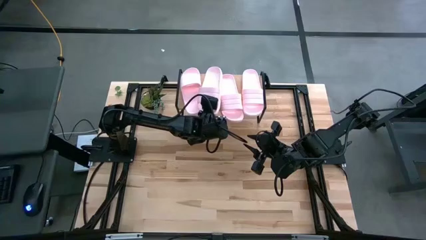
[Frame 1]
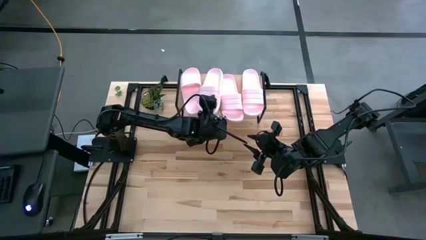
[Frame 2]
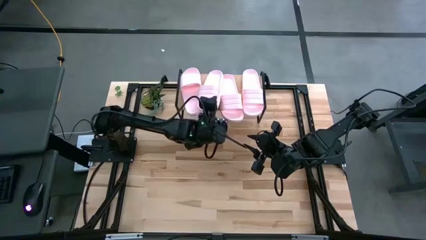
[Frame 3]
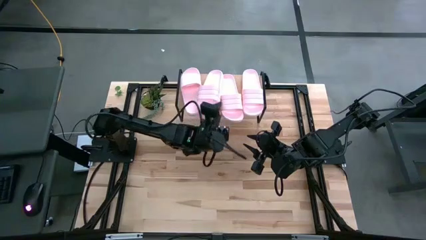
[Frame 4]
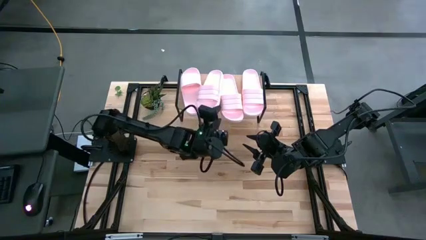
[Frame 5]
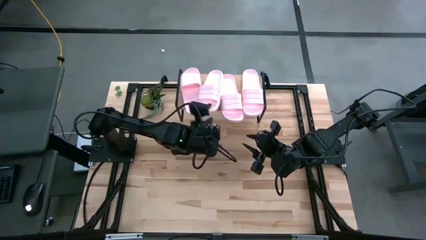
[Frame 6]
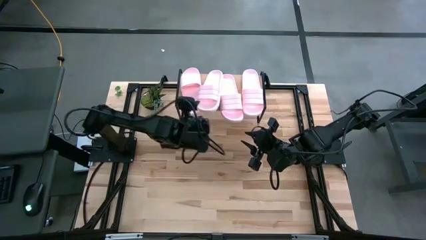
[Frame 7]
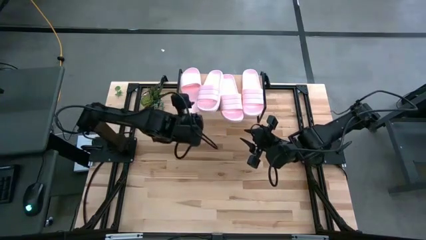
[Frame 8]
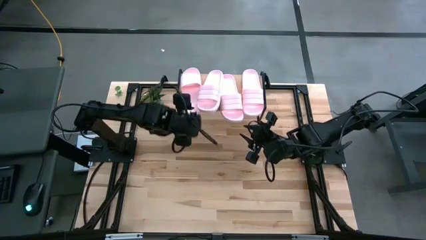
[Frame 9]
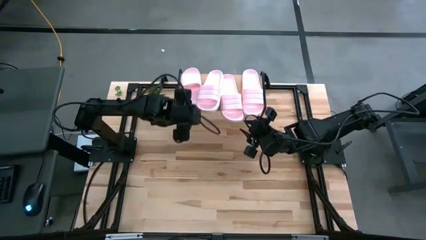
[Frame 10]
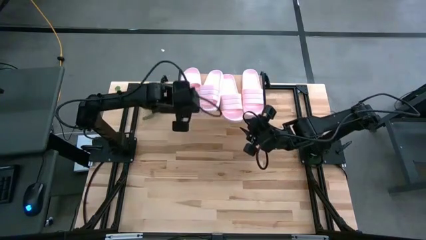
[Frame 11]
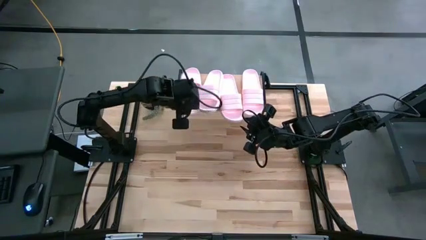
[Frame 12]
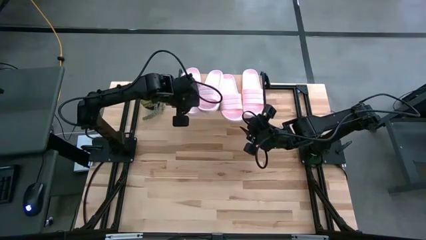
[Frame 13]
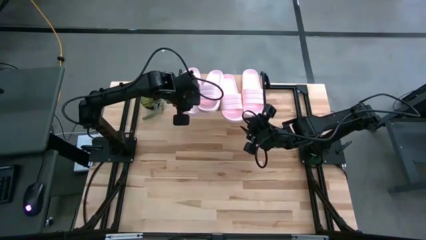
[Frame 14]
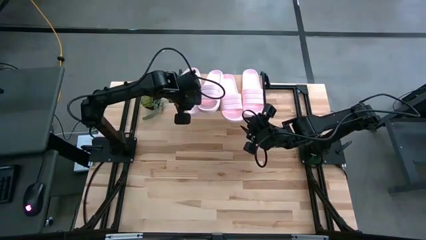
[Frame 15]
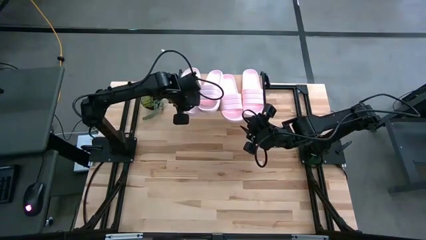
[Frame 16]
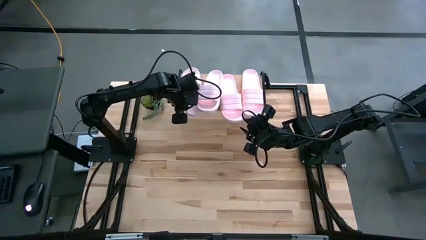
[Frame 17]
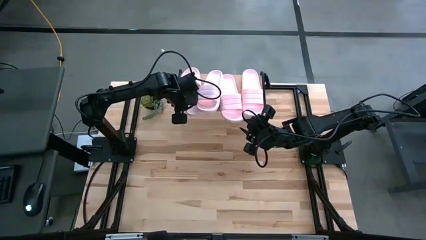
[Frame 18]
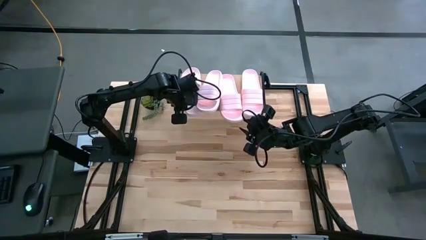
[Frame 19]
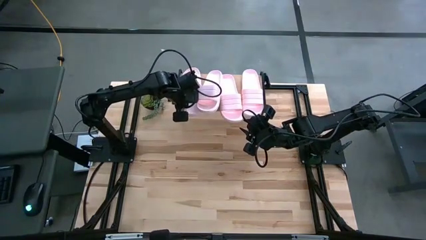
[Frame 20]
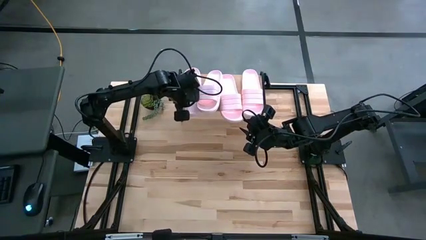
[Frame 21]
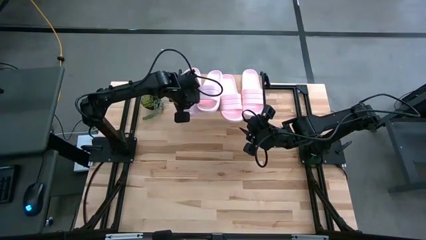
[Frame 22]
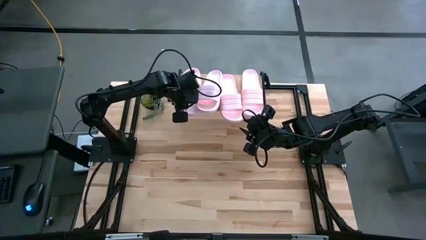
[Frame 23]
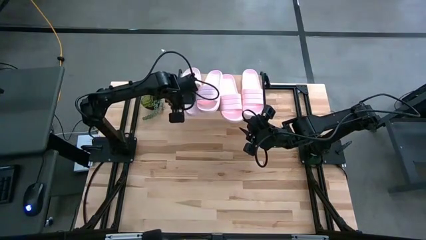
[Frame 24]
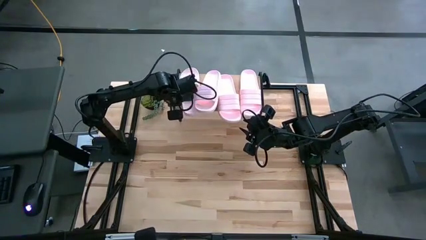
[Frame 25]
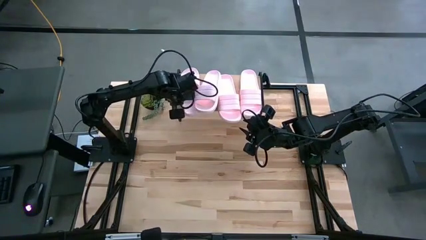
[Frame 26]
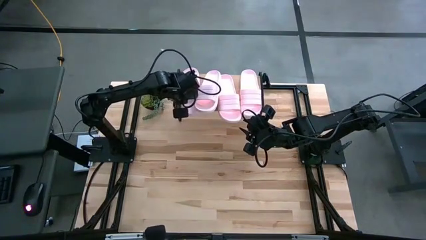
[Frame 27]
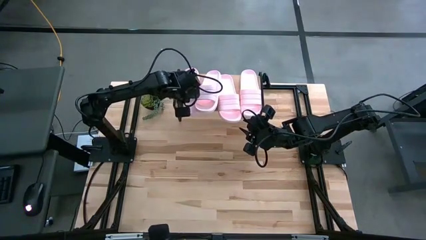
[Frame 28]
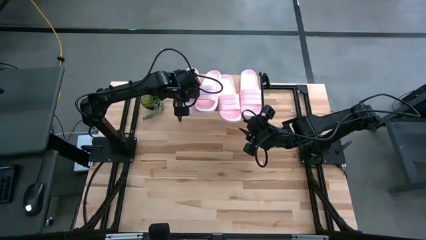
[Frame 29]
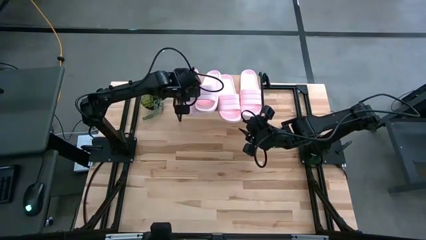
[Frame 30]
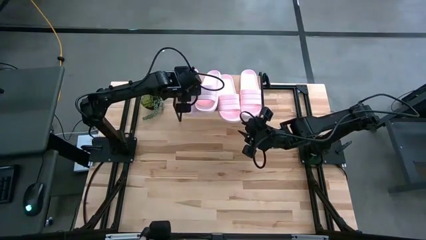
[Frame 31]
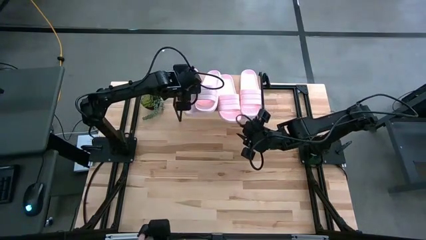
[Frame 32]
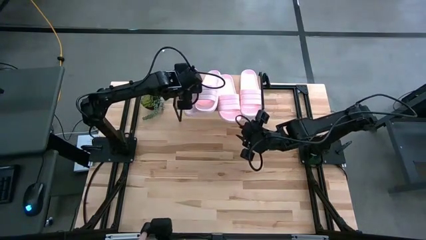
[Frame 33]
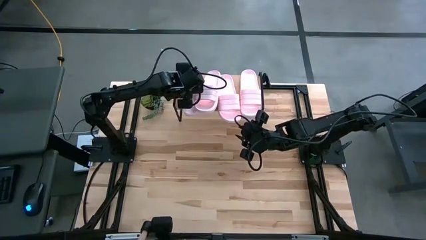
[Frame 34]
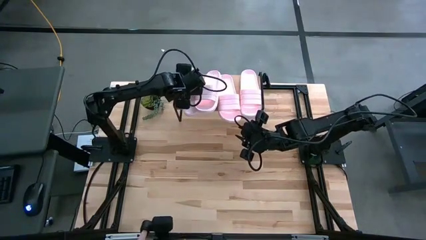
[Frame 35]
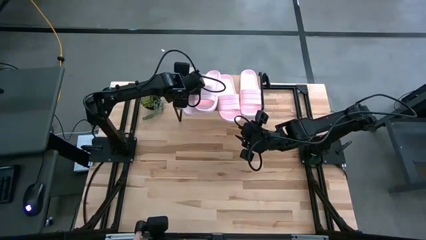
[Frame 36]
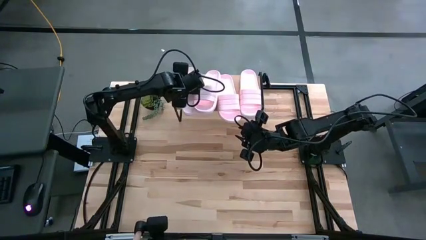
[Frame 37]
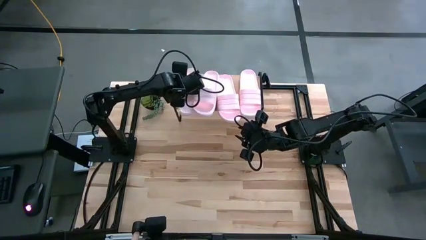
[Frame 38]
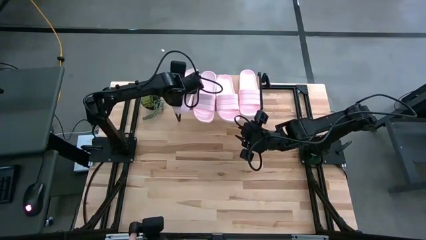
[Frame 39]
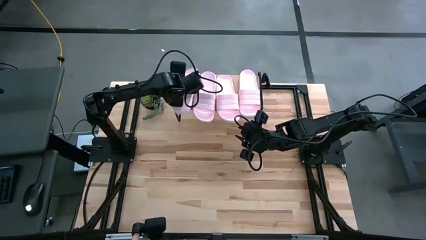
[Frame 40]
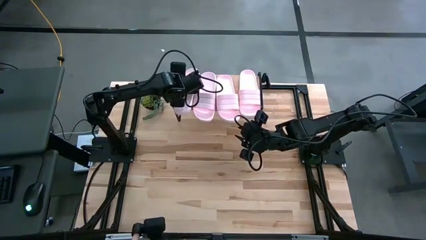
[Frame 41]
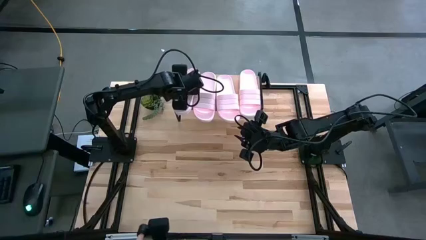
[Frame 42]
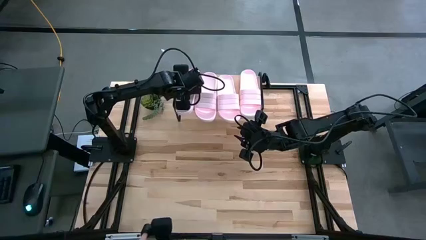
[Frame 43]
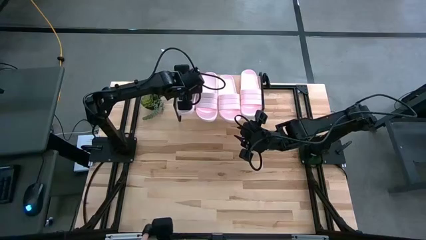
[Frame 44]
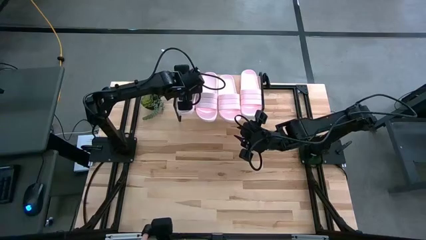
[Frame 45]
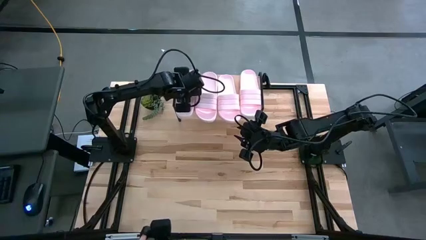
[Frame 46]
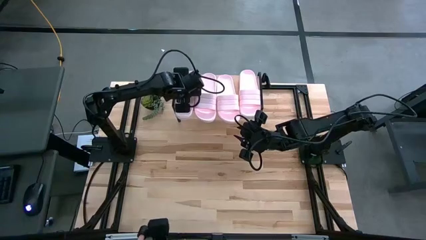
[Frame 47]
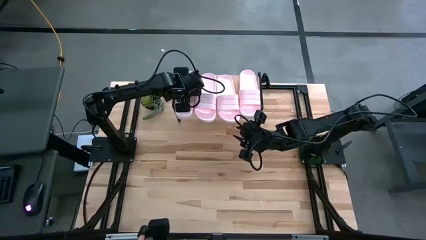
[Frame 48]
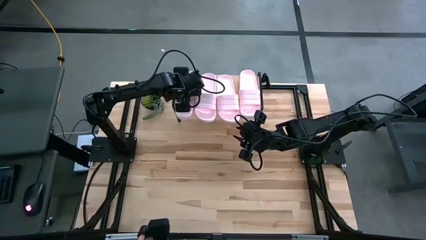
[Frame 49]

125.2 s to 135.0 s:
Task: Pick and place slides into the shelf
Adjust the pink slide

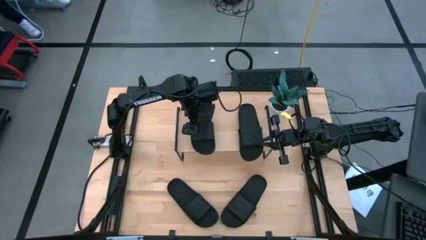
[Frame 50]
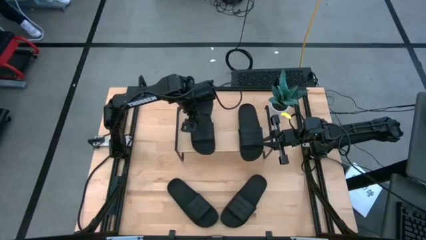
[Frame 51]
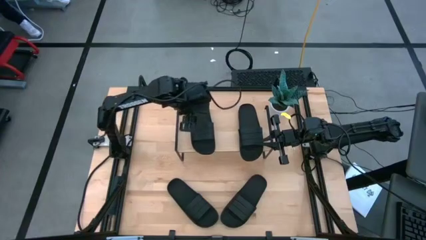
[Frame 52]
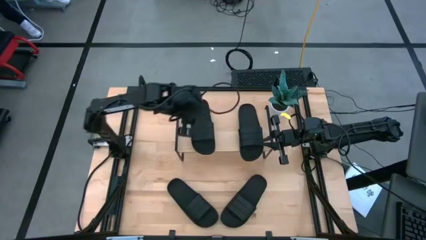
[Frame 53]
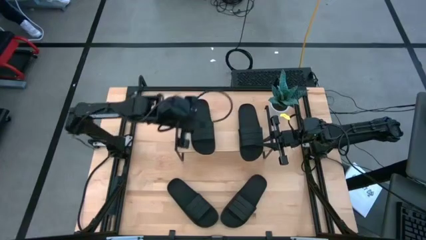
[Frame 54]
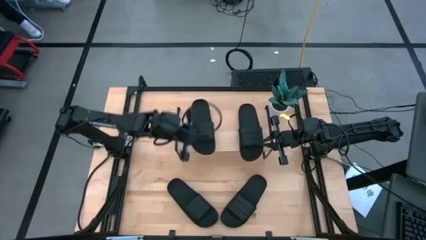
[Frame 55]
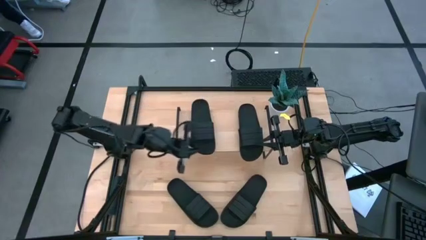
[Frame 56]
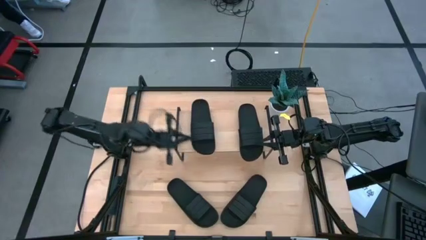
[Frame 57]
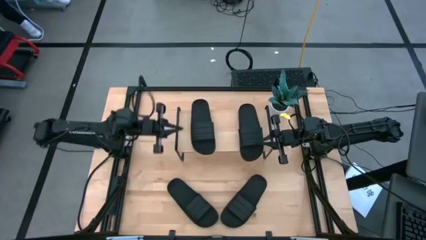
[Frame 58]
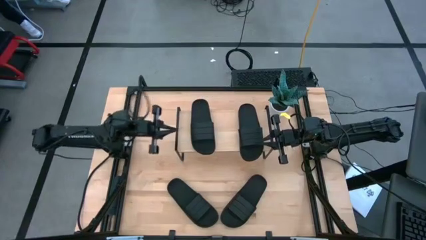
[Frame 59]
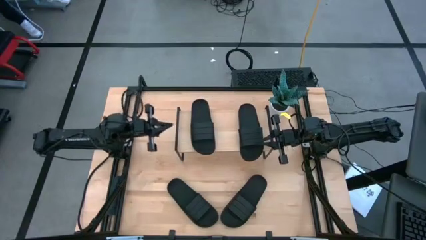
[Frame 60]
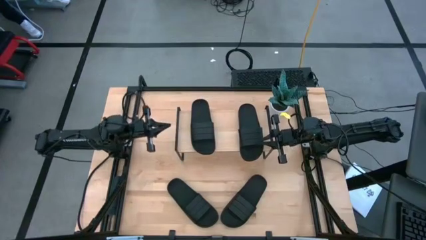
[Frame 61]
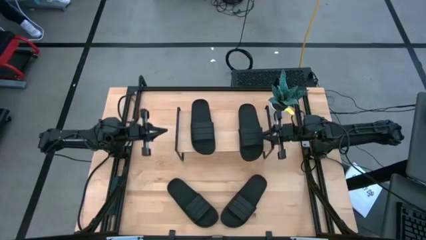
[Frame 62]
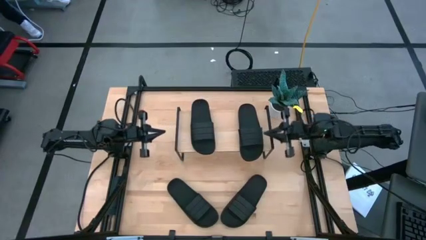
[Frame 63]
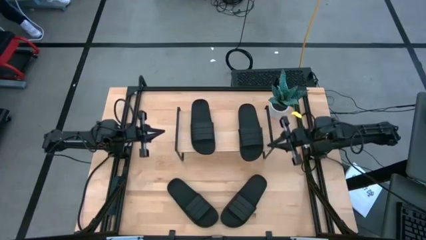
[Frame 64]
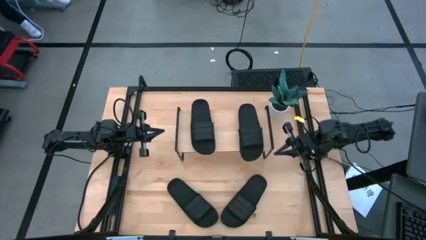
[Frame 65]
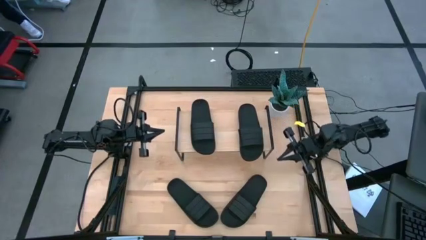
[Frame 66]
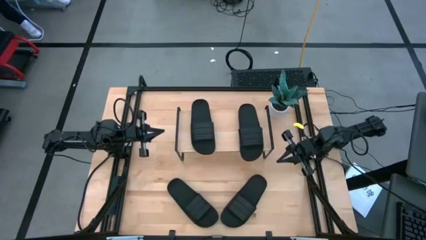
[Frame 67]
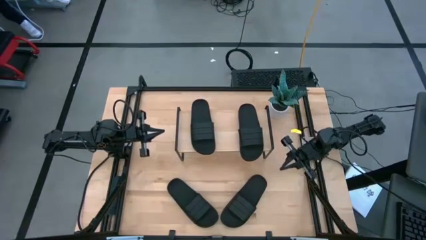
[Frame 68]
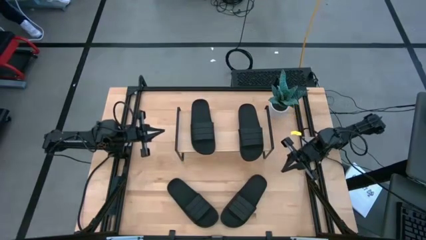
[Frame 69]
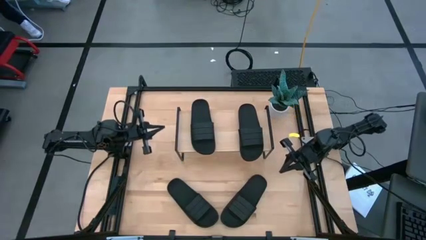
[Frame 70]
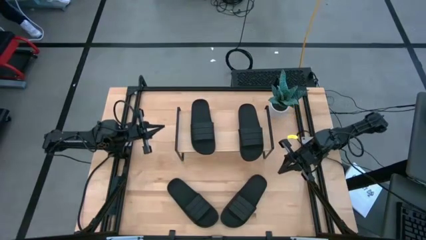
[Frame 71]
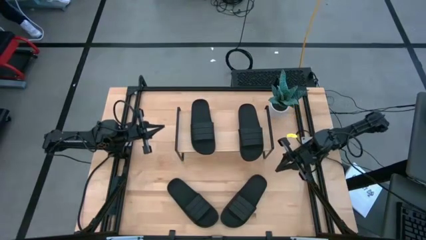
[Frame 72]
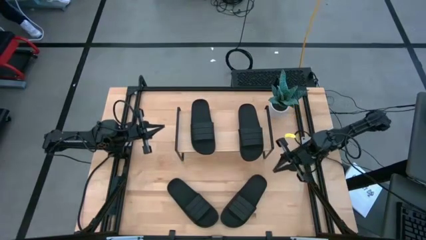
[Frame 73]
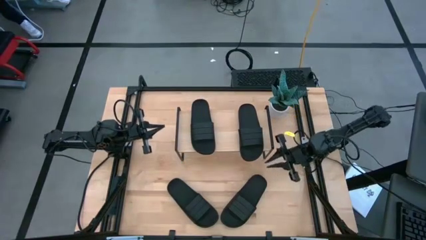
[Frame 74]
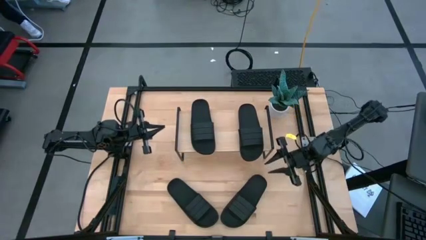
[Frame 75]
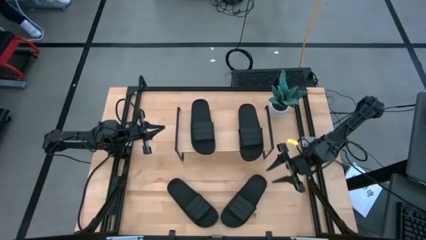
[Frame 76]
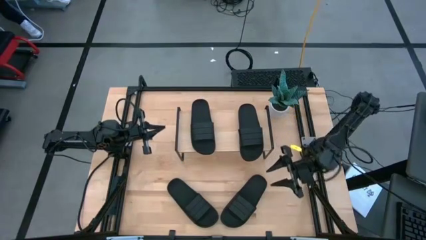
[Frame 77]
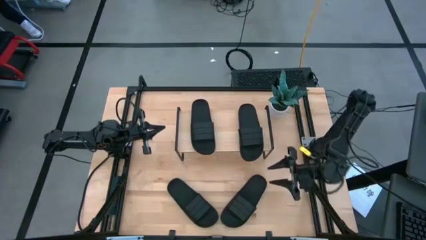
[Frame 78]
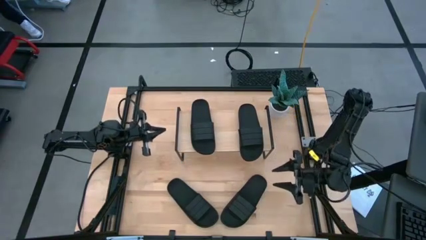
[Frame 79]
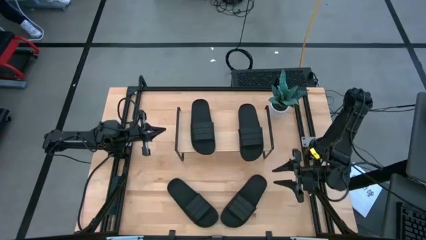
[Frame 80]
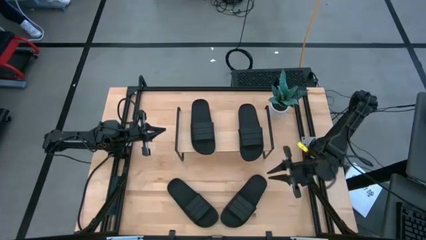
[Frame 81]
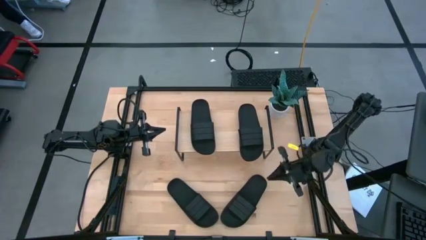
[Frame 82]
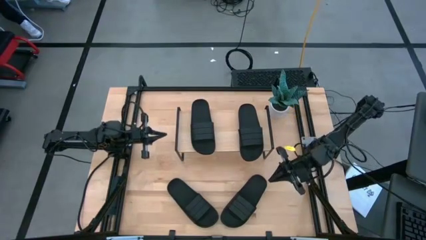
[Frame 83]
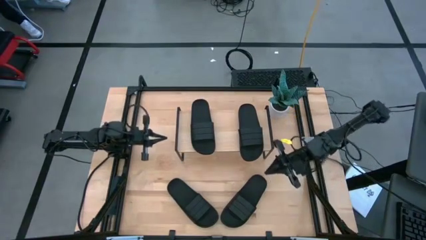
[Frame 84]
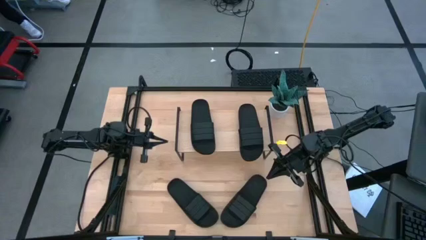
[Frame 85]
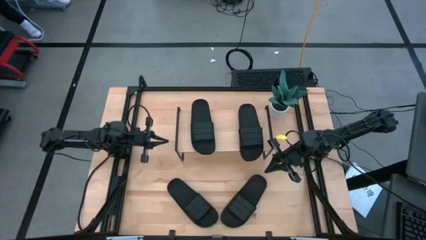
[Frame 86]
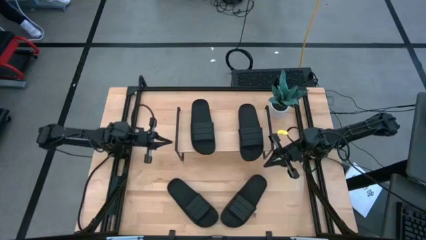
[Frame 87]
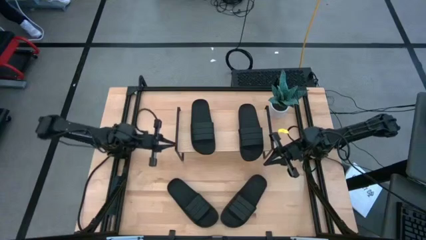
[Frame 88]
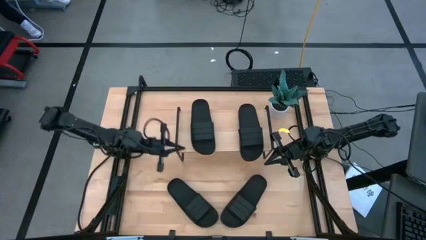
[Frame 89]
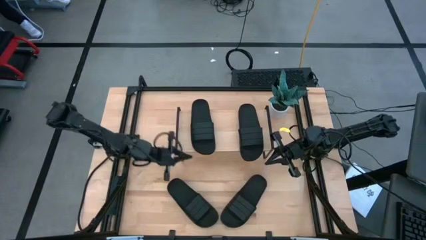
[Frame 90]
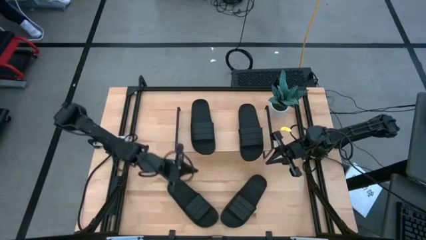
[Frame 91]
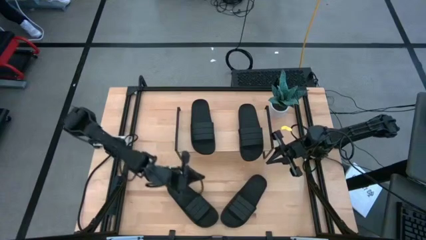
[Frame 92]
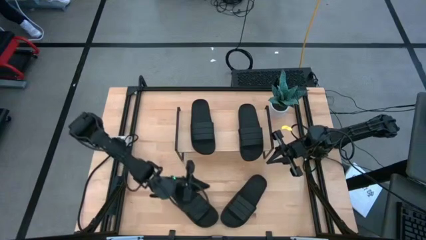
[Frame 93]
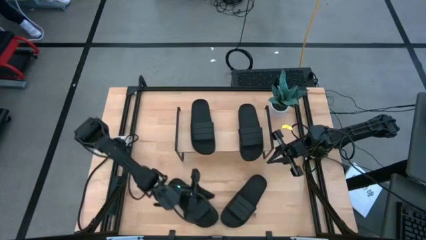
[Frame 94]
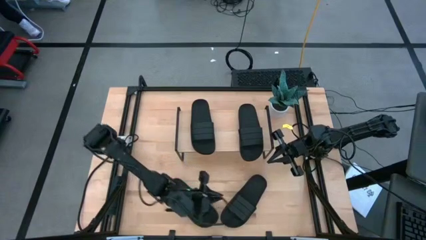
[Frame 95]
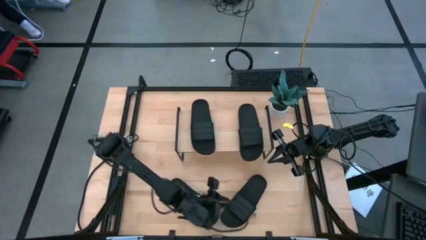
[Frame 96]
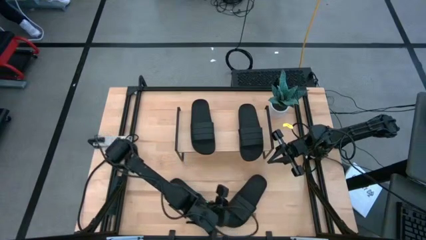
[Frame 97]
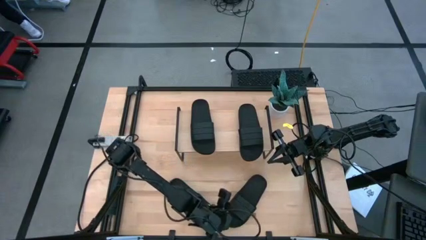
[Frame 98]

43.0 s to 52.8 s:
Task: Pick and place slides into the shelf
Put the right black slide under the shelf
